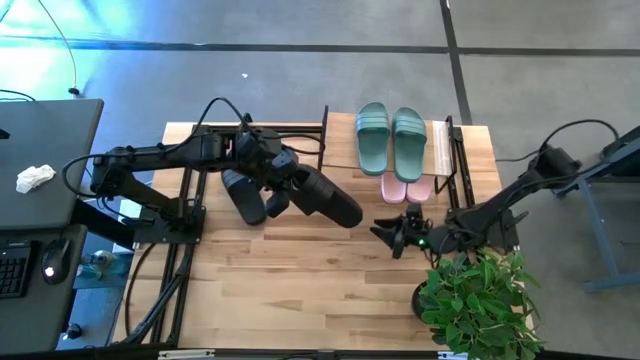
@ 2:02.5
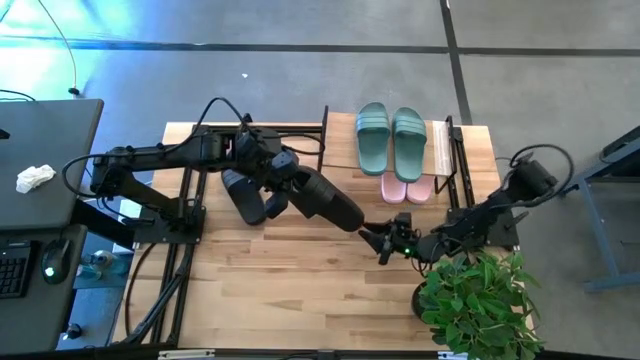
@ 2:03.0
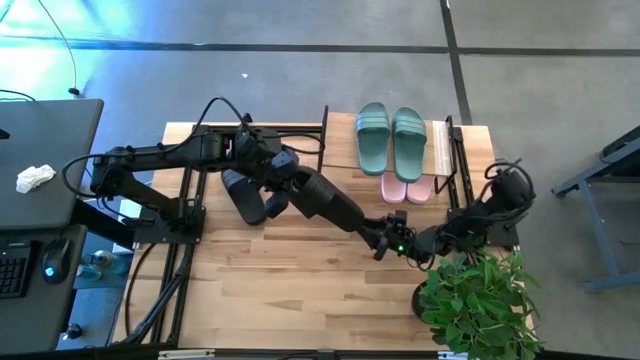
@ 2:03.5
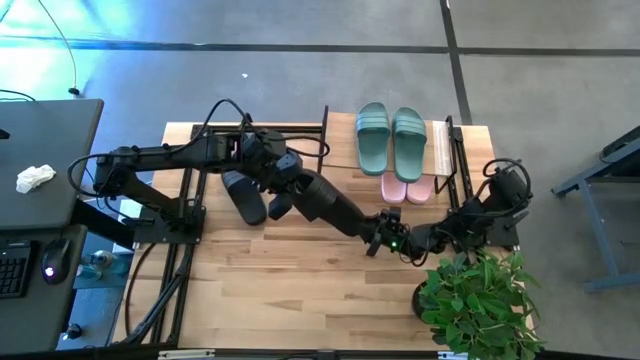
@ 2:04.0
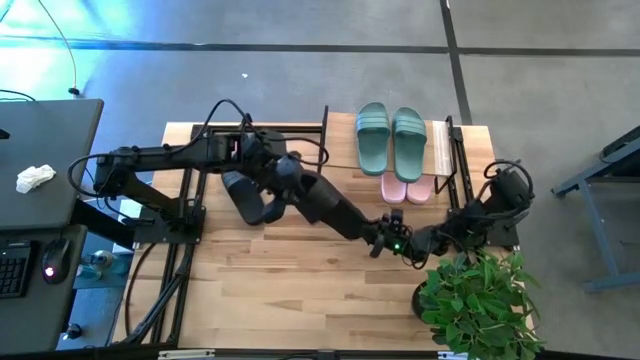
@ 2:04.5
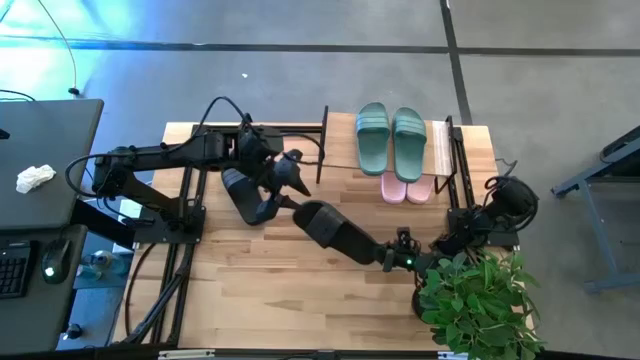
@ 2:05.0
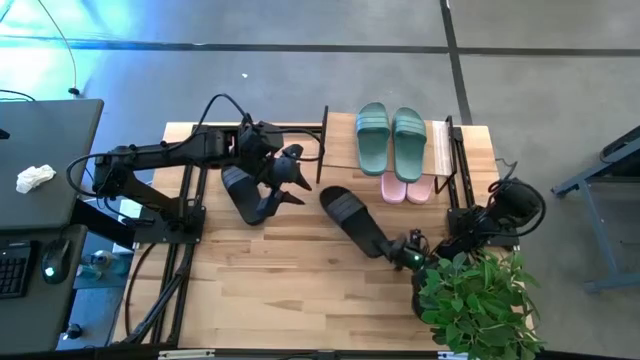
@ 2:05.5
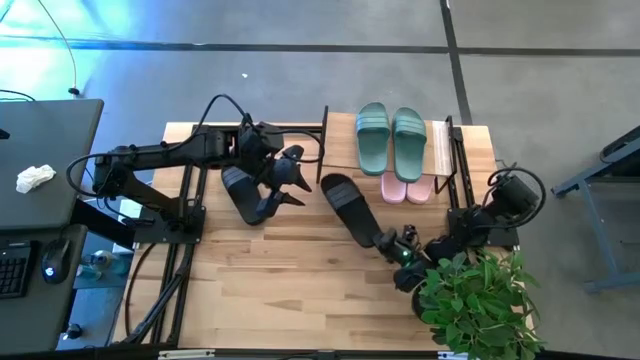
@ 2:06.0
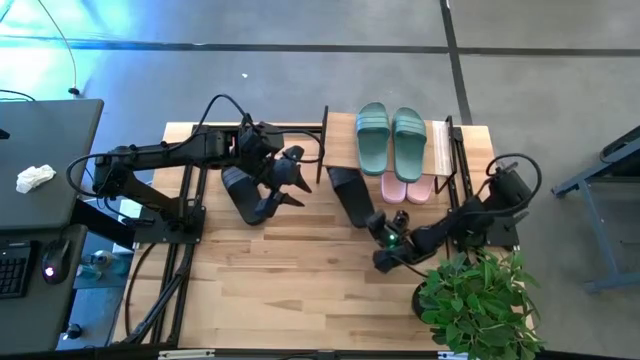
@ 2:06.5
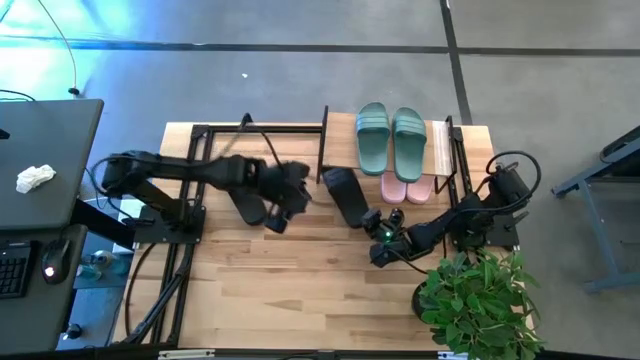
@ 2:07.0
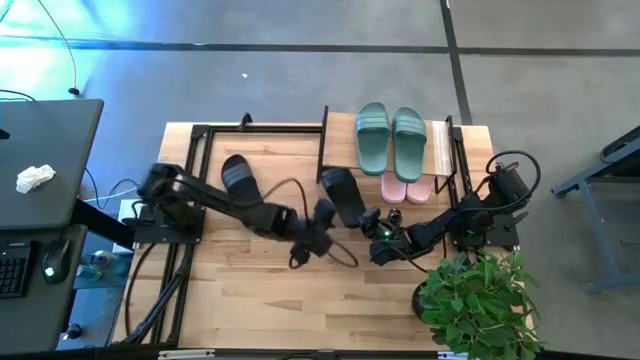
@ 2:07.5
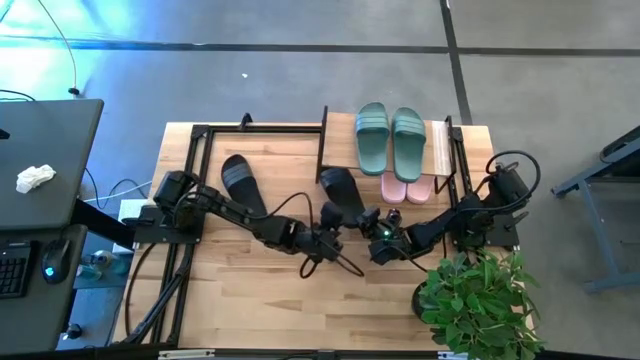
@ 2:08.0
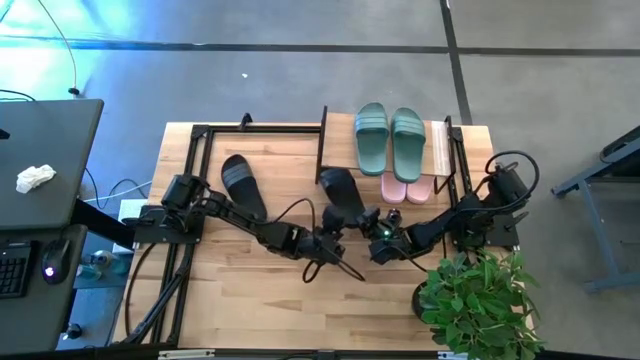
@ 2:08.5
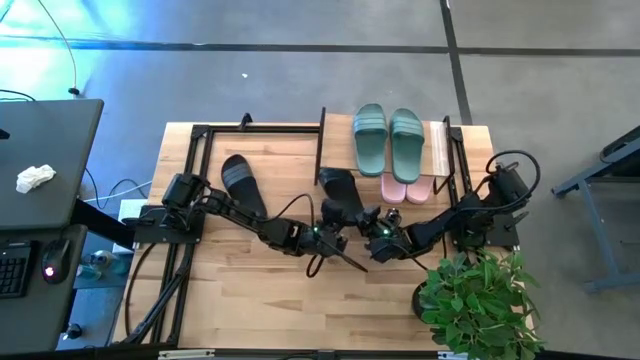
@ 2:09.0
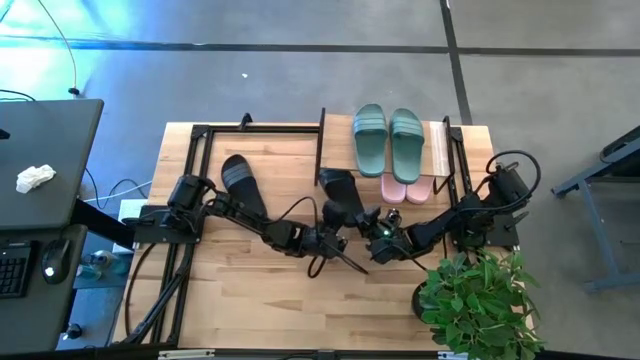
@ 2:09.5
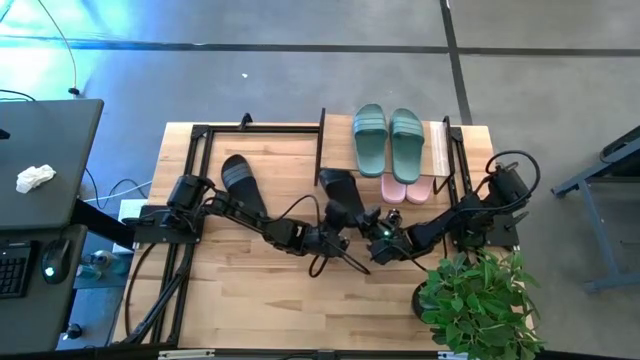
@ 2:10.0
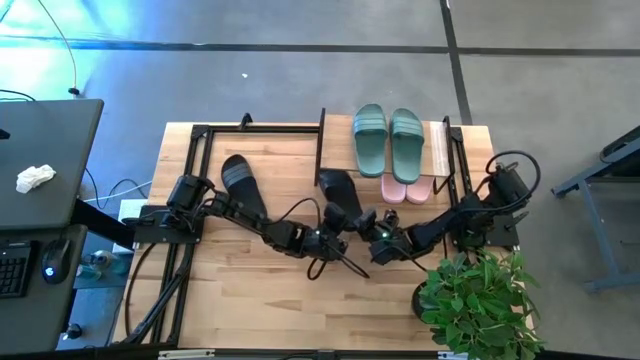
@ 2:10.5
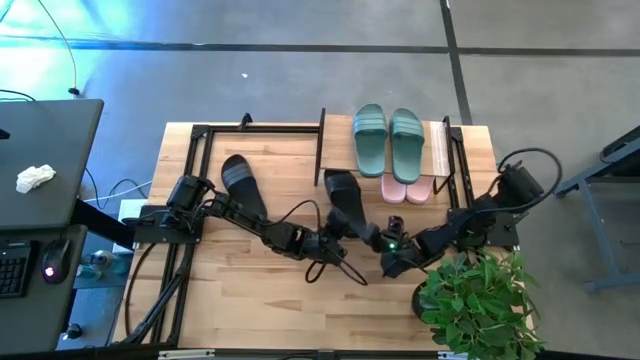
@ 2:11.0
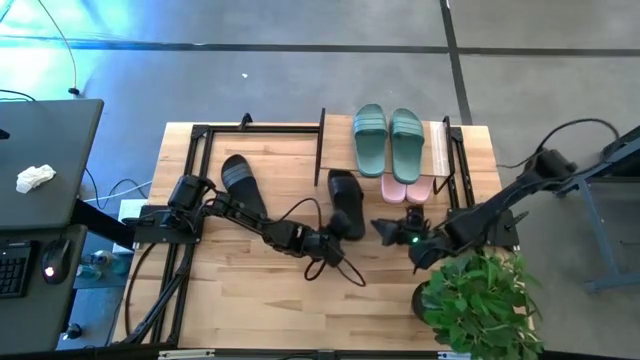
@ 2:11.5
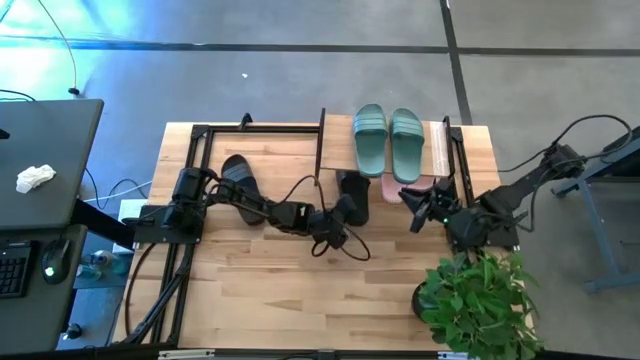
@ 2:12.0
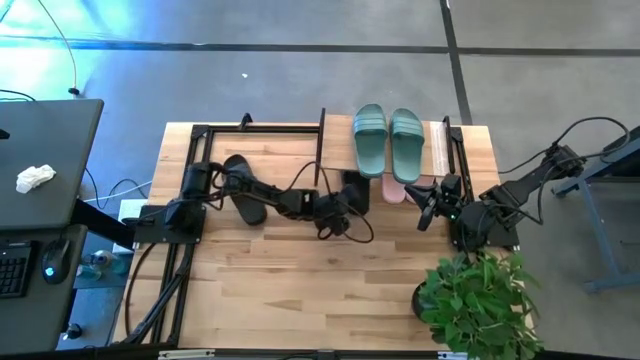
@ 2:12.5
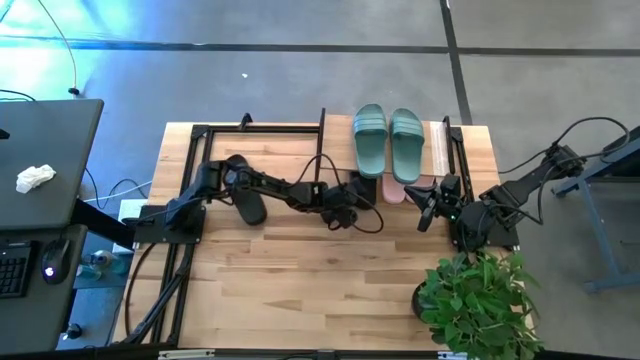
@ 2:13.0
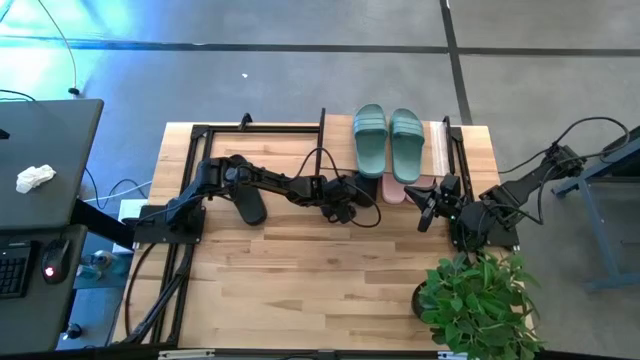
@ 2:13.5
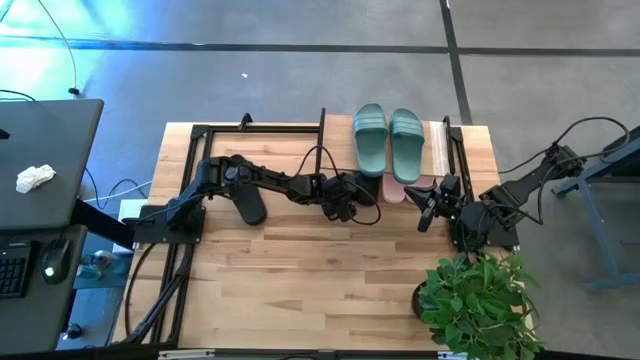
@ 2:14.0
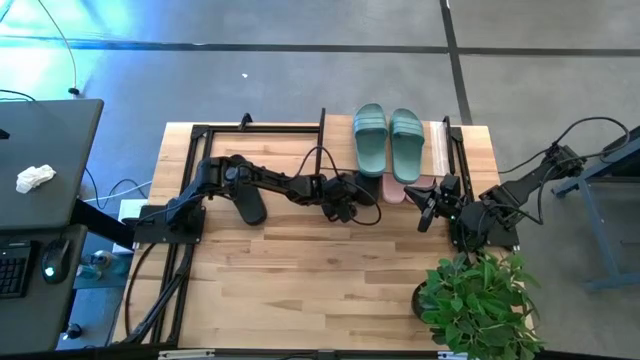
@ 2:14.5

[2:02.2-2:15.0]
Task: Pick and place slides into the shelf
Put the bottom black slides under the shelf

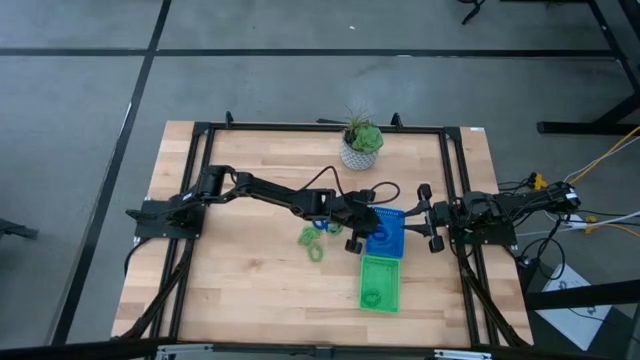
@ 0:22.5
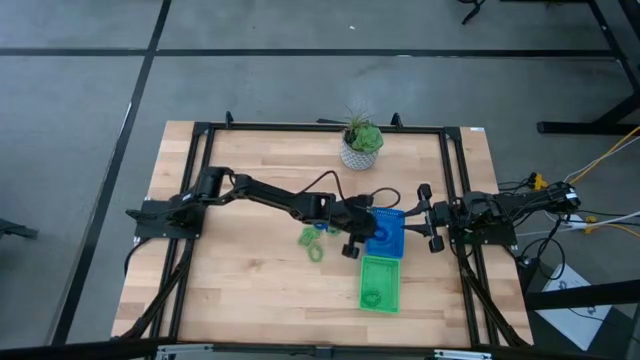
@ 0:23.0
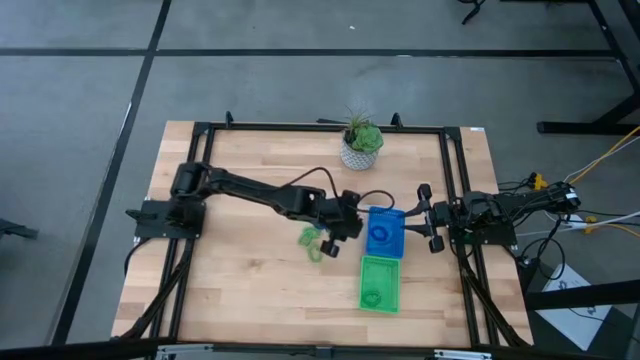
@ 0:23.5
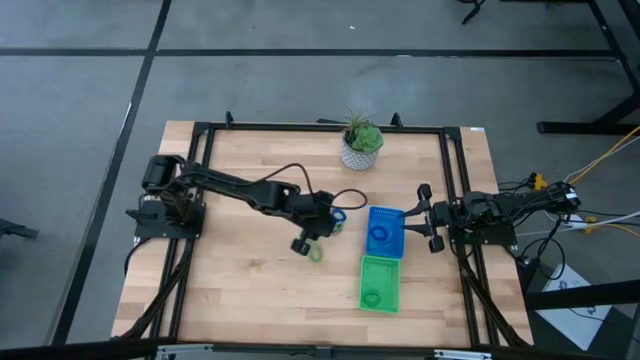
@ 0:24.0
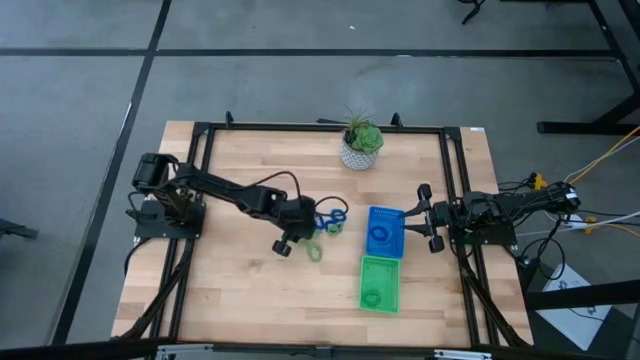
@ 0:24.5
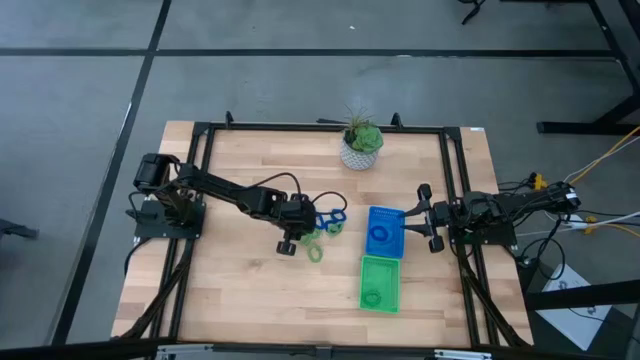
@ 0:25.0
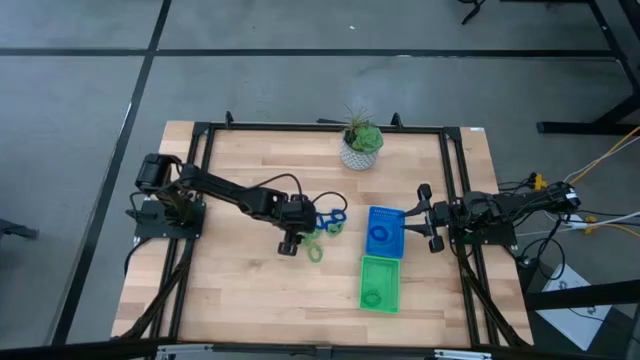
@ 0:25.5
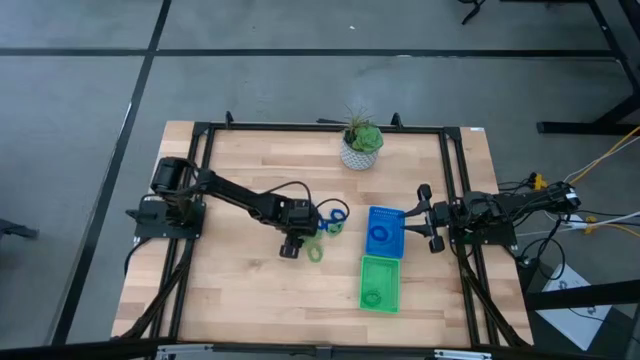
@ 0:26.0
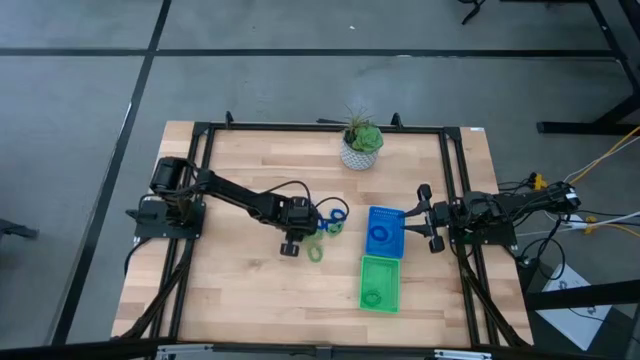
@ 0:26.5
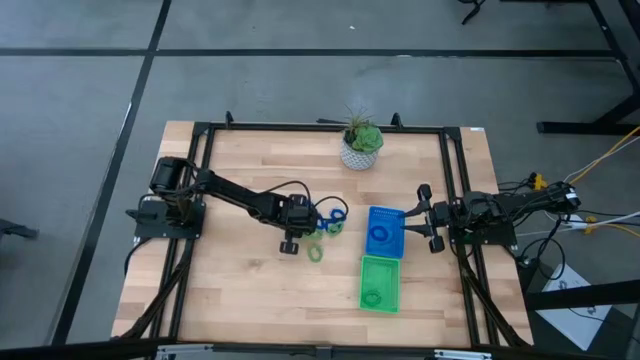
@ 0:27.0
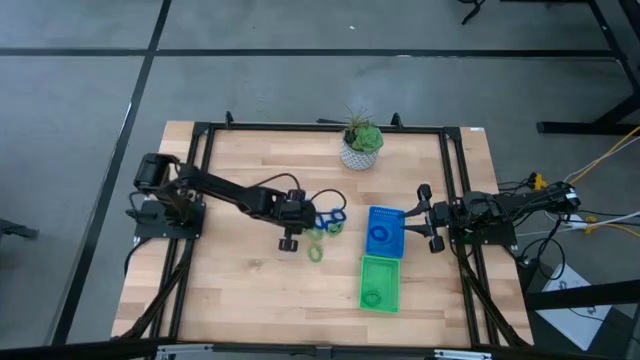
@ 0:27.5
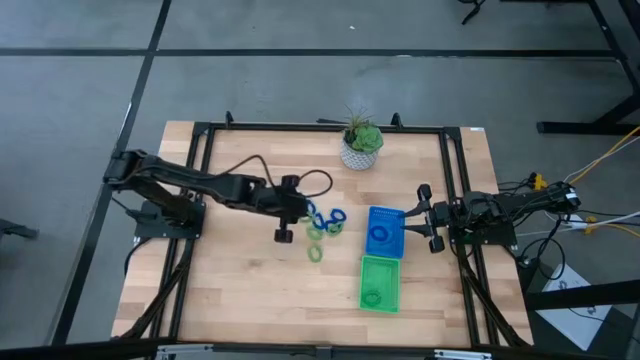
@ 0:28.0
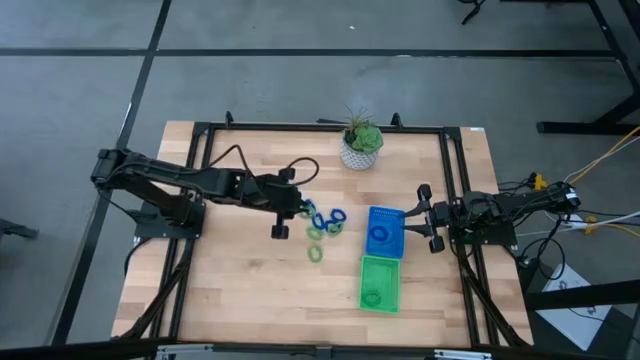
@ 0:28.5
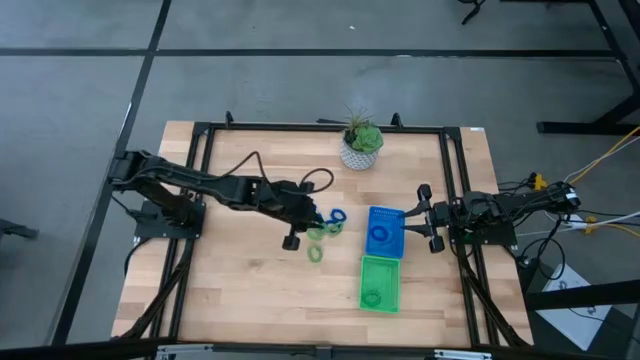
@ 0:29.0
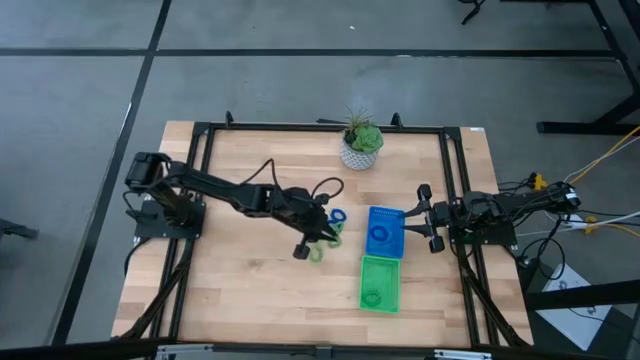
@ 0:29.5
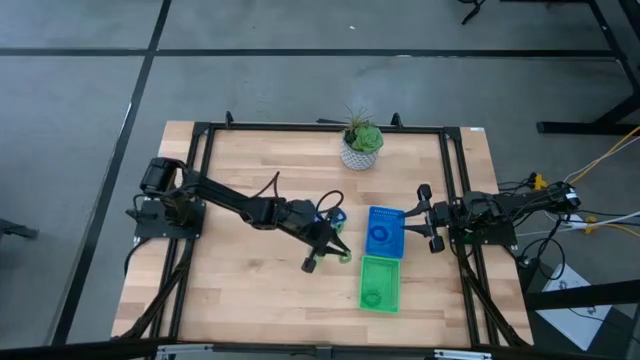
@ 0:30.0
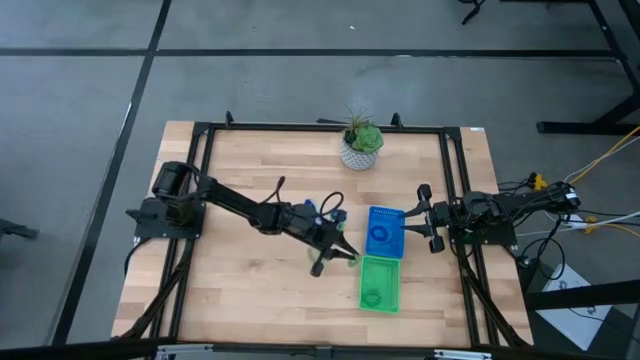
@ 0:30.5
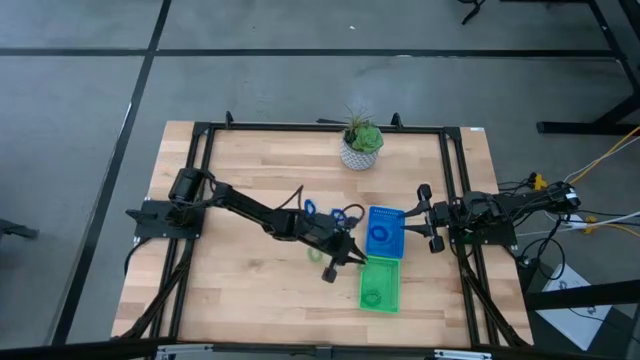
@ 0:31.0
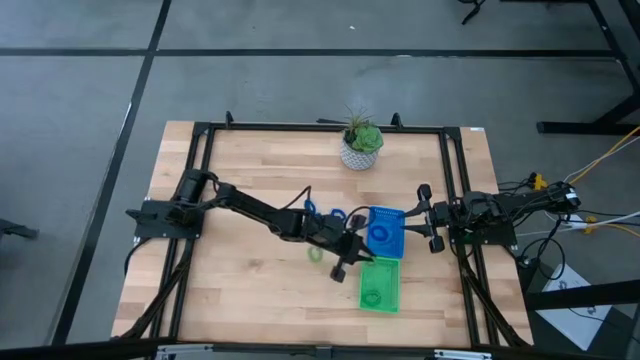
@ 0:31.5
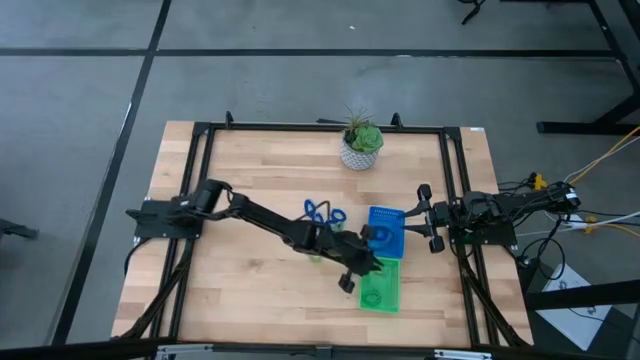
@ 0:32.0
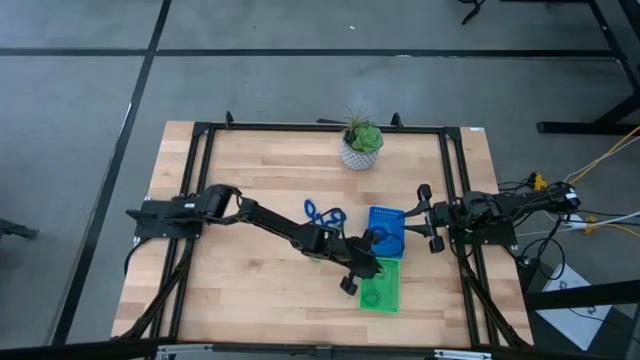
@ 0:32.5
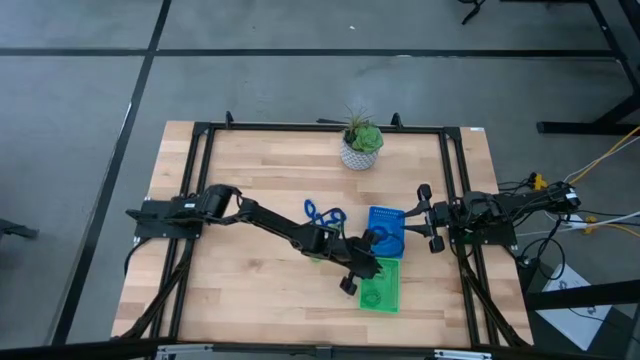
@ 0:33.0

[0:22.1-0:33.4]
Task: Sort spring keychains
Put the green spring keychain into the green bin
